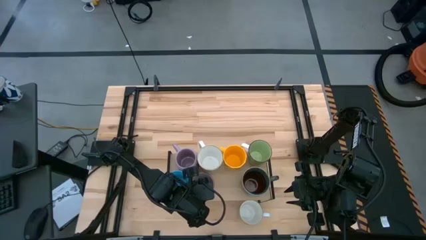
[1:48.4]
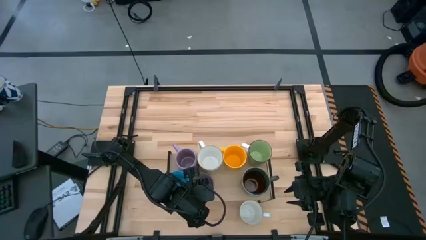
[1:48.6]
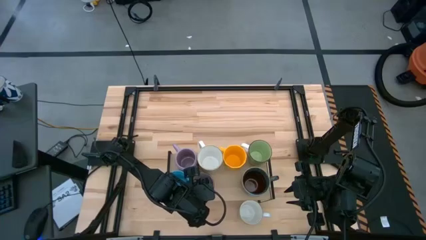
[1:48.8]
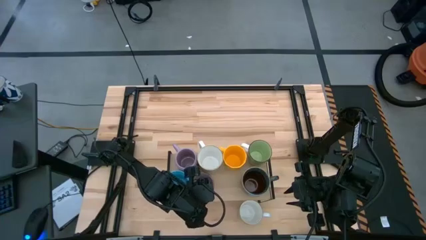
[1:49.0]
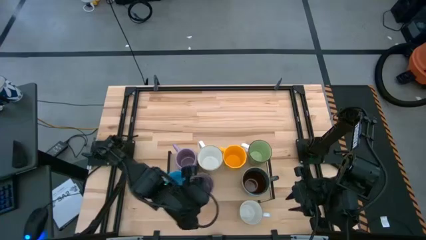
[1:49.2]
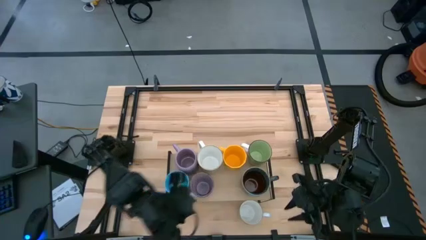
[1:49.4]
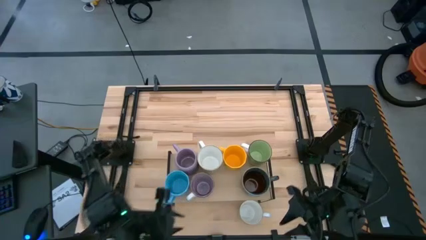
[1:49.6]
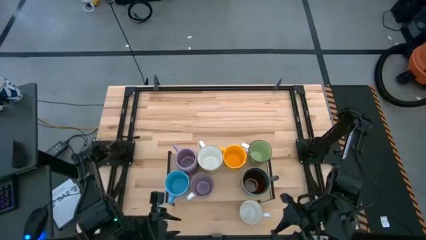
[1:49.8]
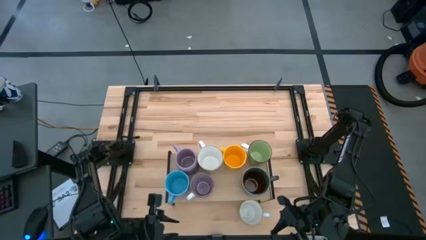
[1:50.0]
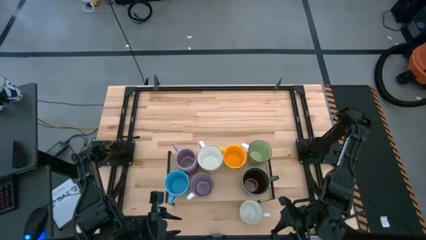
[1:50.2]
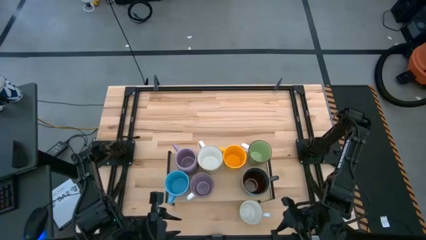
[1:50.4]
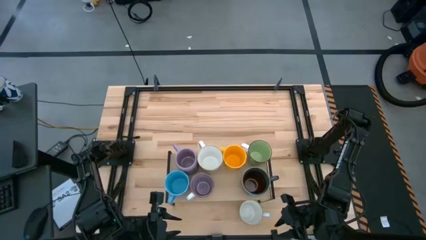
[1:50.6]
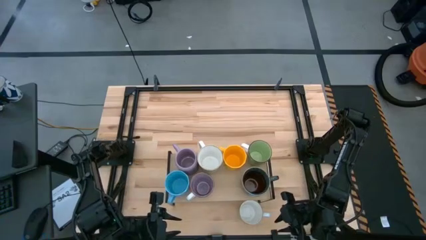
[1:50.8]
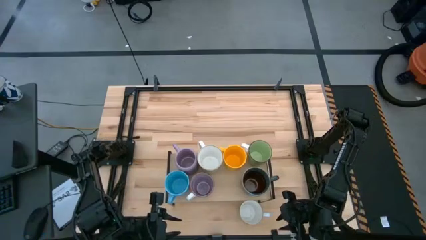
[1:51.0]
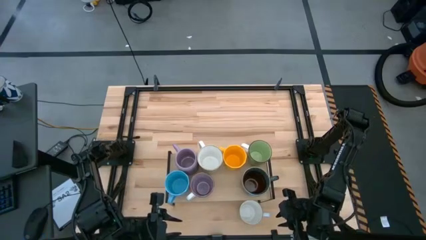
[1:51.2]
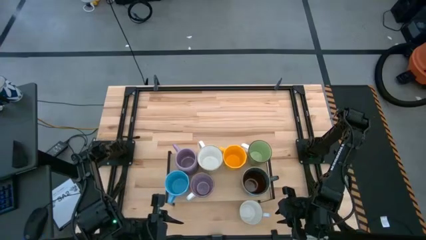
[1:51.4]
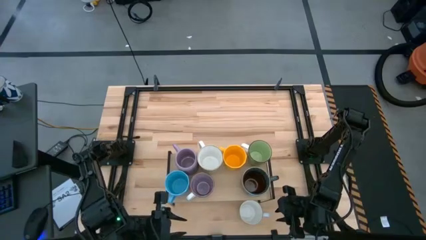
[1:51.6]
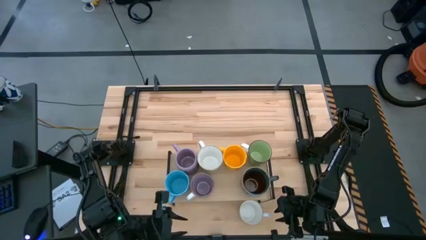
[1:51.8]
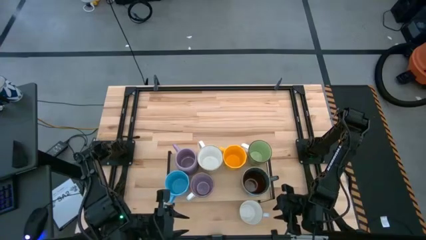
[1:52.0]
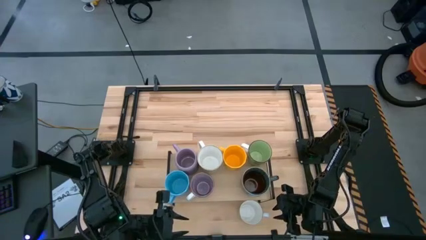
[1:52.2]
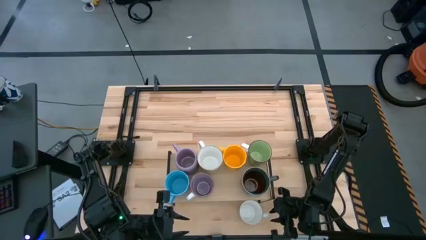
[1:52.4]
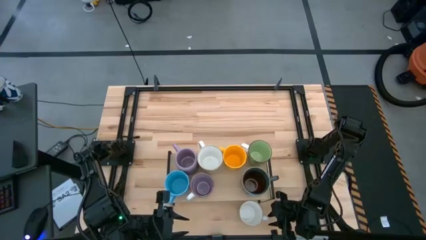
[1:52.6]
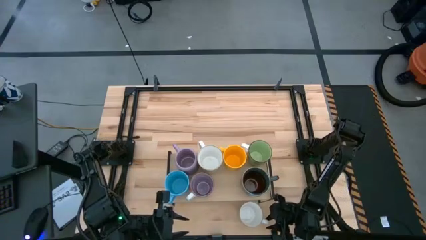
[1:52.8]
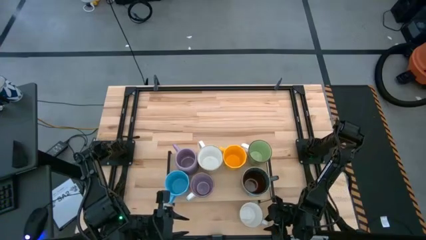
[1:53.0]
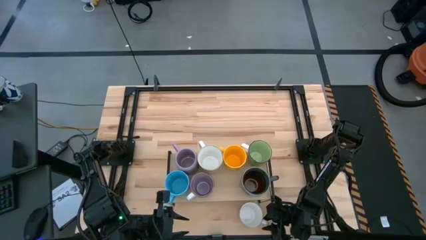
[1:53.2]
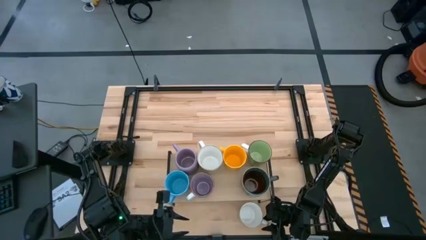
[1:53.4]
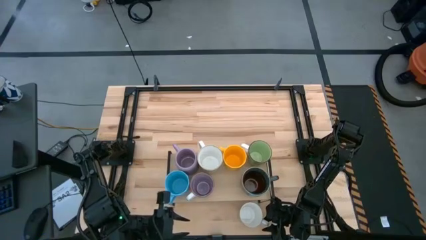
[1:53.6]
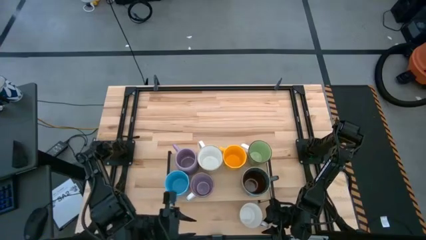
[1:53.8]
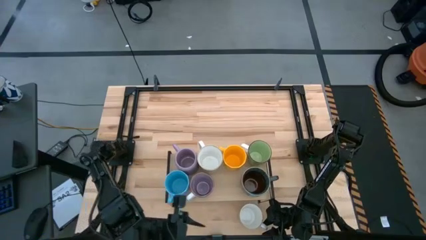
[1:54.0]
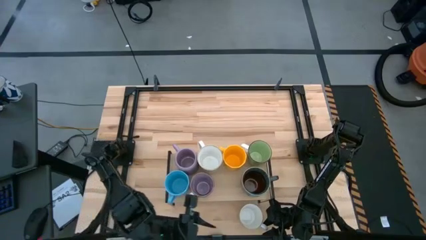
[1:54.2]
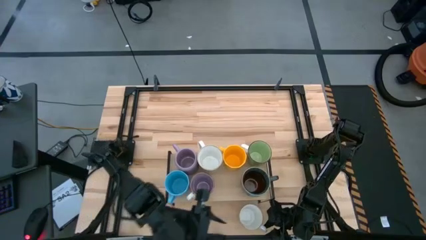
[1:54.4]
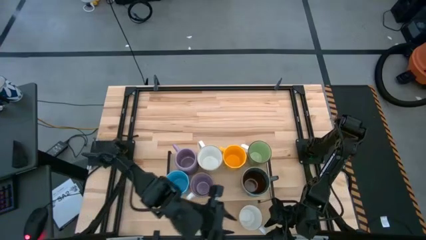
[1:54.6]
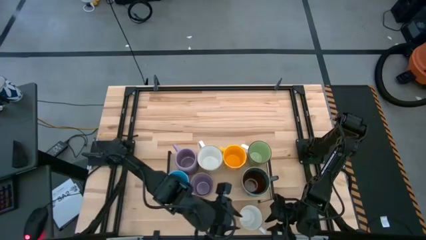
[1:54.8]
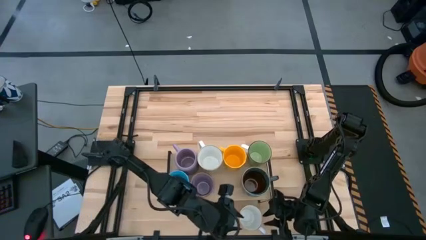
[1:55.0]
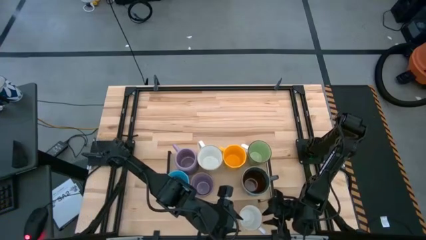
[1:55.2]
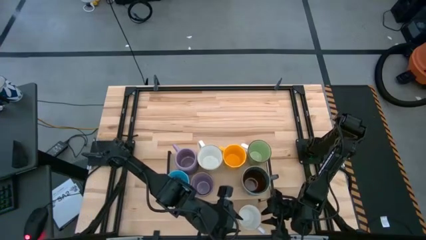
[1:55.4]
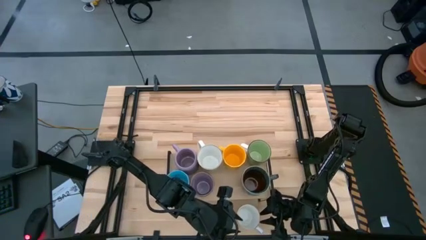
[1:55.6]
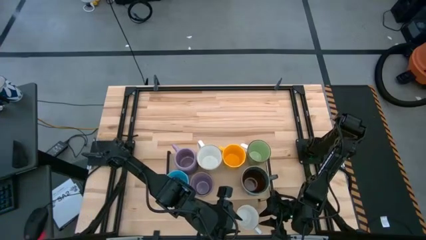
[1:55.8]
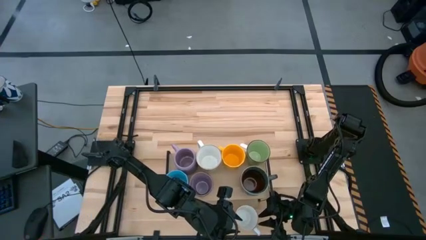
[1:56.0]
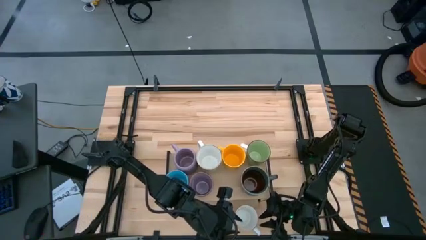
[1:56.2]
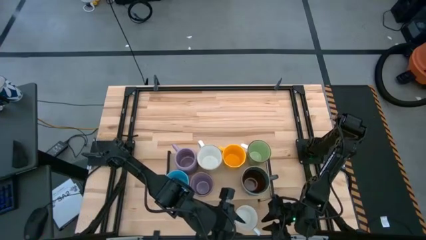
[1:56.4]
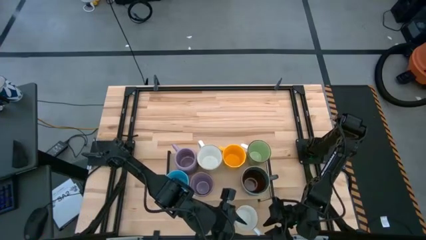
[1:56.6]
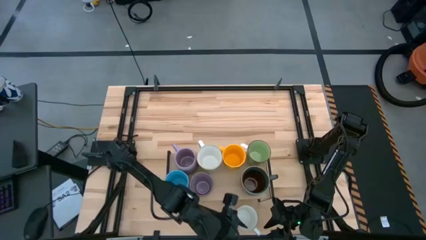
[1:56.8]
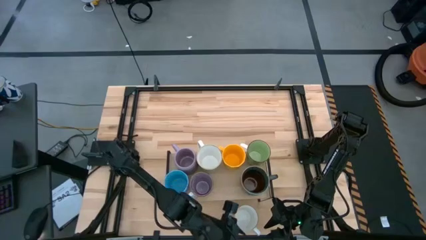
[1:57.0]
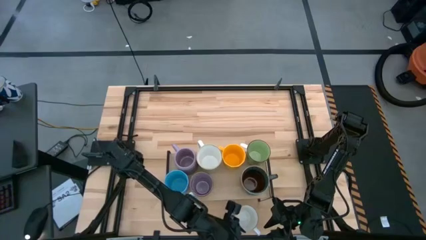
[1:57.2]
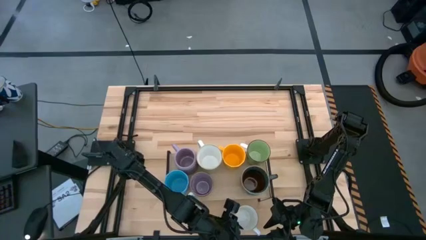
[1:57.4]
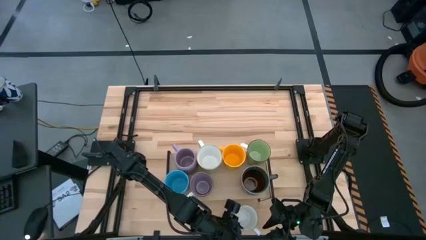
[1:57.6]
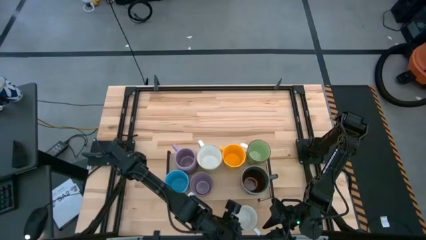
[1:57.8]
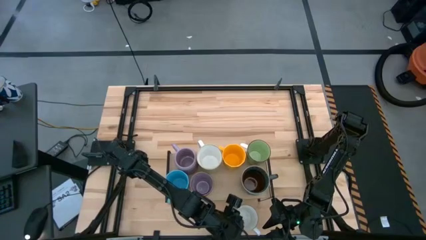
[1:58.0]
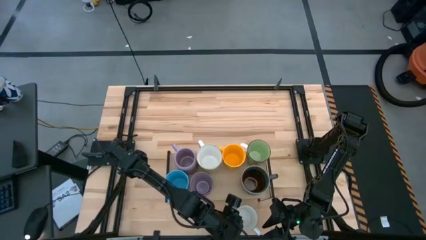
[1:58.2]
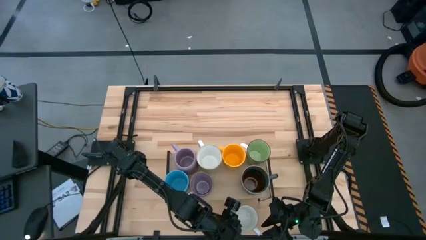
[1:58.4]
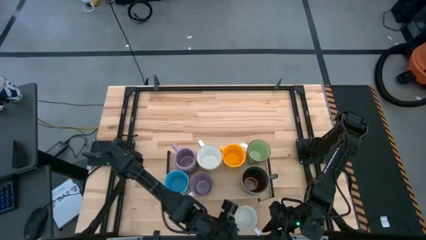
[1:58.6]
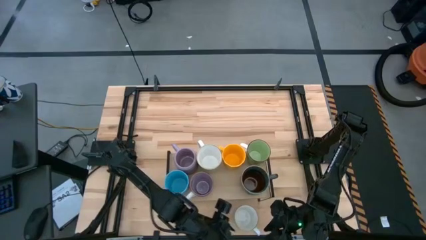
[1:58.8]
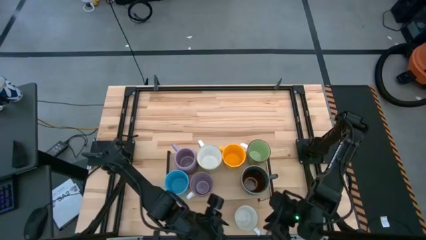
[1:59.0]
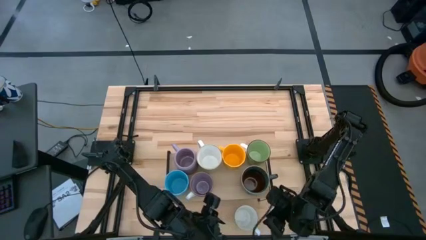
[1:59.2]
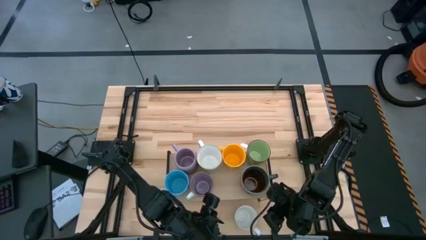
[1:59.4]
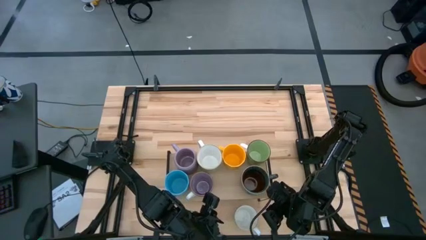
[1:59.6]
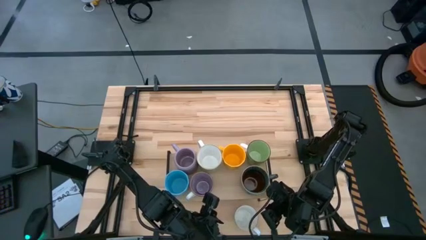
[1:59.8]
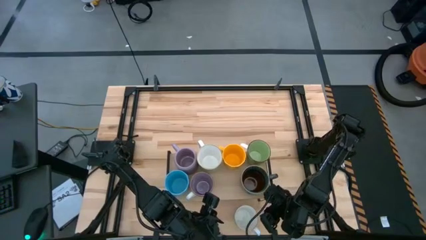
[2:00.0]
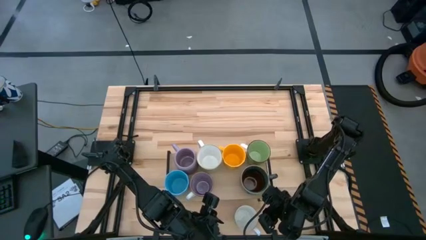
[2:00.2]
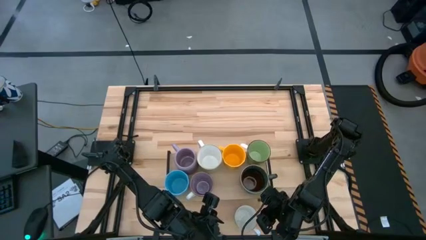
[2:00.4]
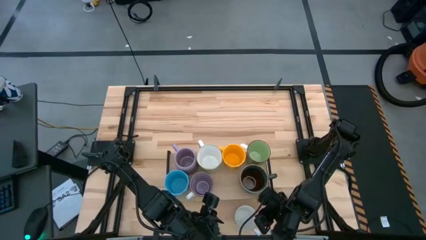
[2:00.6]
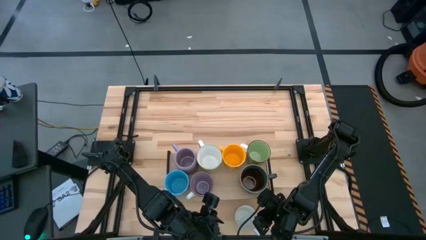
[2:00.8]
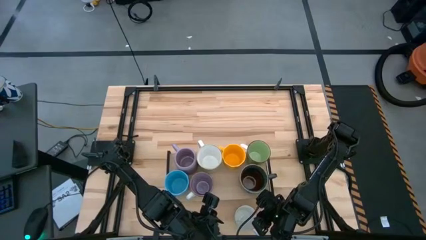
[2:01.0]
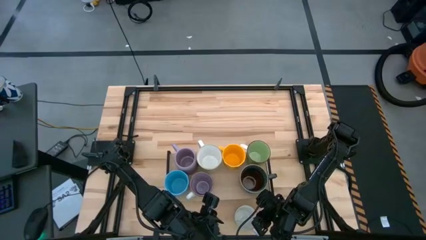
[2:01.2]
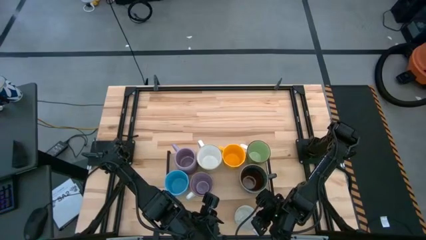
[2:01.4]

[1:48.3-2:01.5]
Task: Place coffee mugs
Put the blue white mug on the shelf

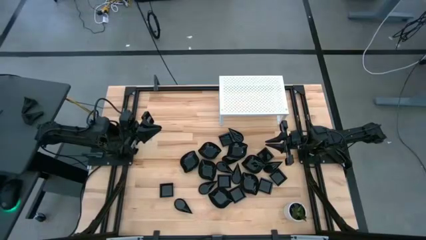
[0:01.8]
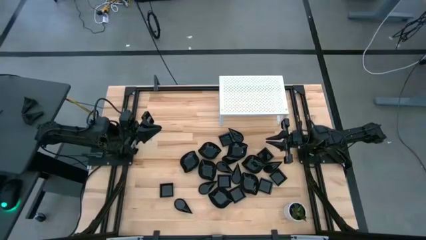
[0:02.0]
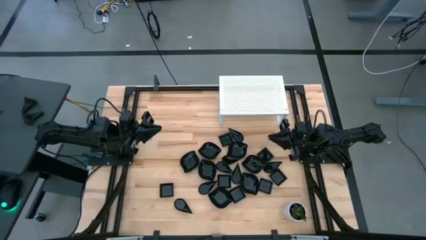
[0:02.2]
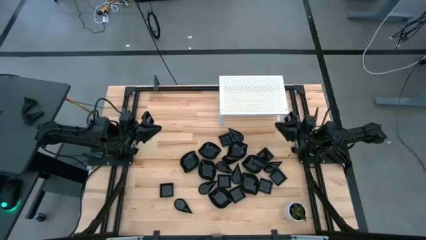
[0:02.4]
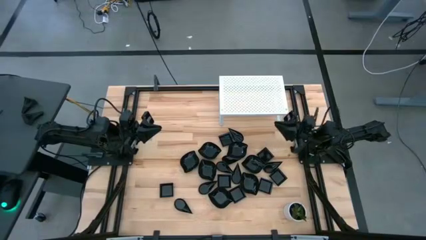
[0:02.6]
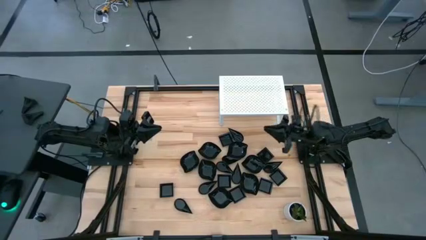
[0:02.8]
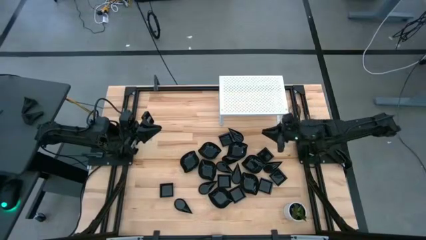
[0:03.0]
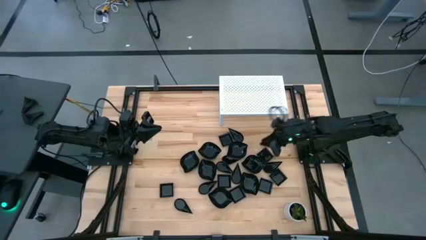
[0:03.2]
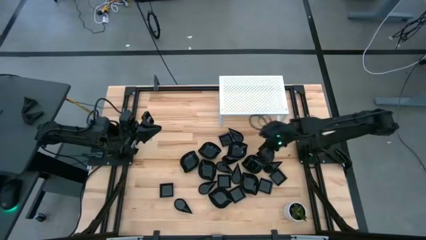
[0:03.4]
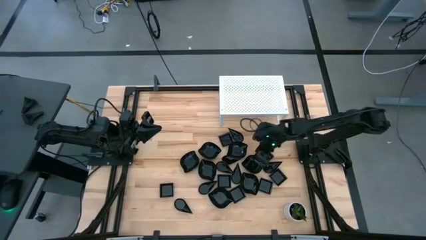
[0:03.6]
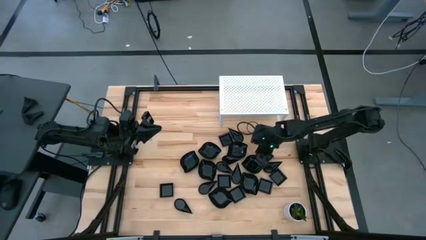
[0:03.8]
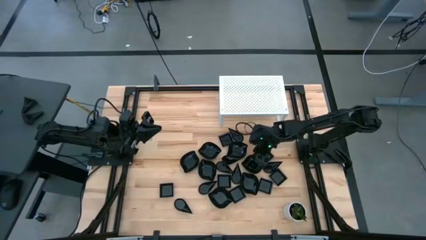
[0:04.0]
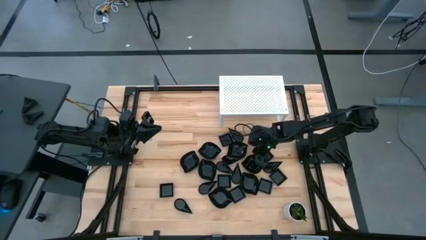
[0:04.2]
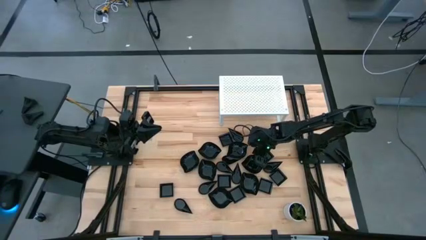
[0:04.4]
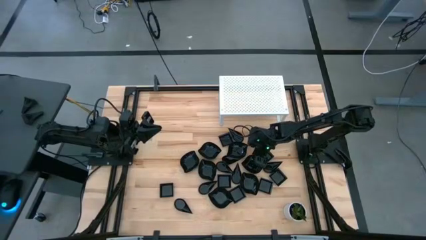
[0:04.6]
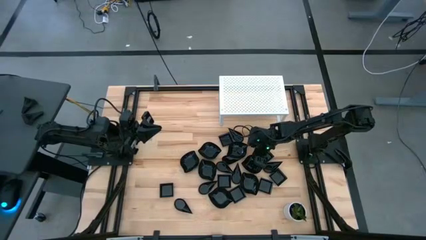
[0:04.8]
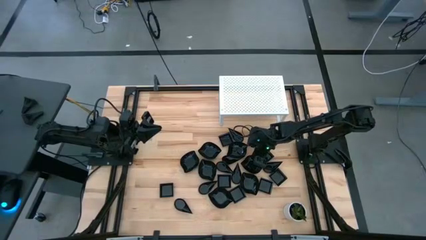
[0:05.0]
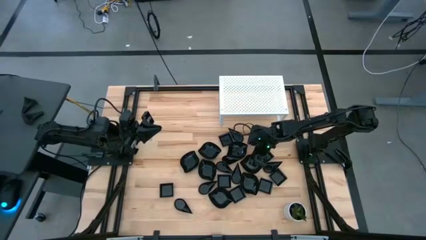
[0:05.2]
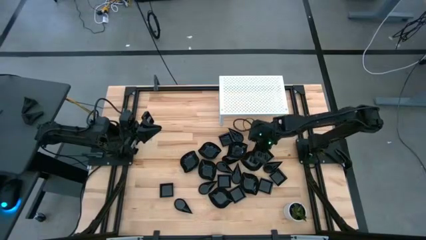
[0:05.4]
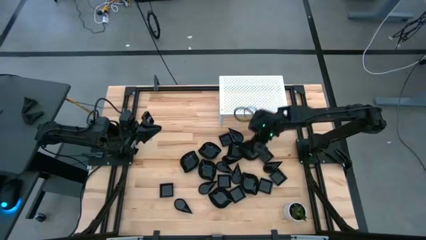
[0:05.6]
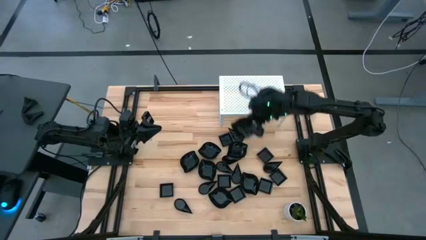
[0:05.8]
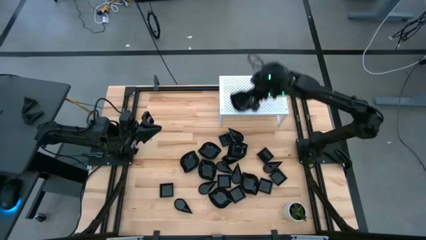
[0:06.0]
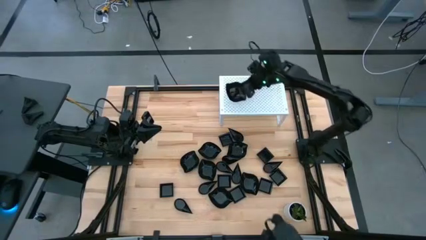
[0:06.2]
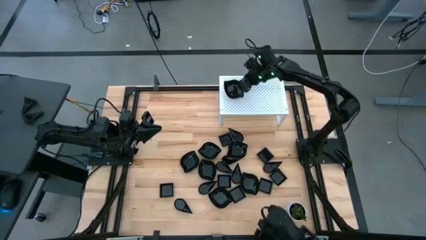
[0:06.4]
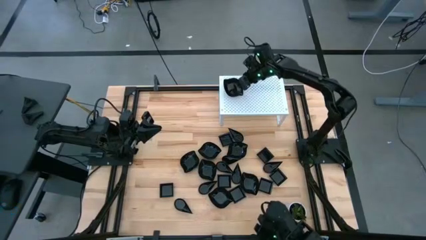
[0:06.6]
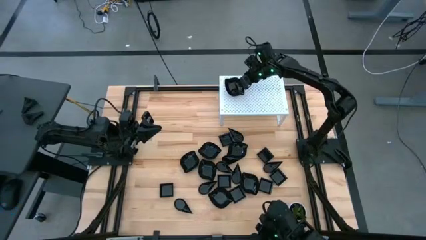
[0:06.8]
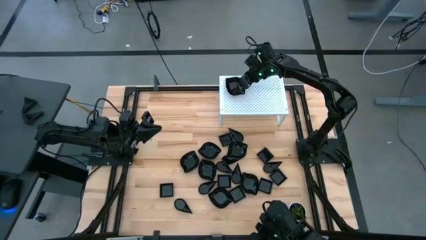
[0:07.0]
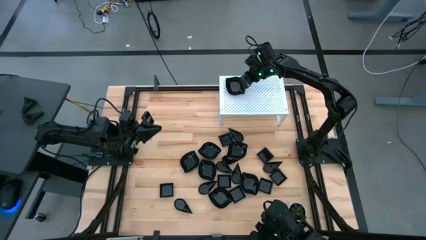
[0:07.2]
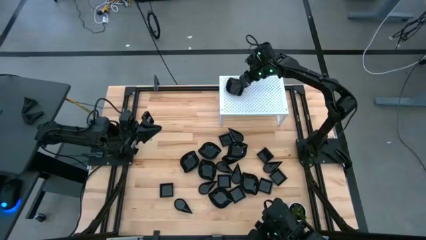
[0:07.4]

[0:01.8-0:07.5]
Task: Pick & Place Mini shaped plates
Put the leaf shaped plate on the shelf
